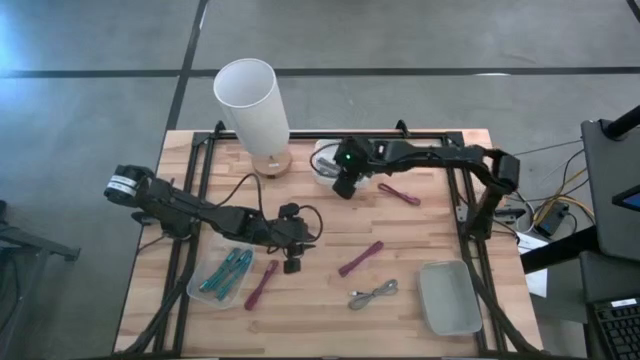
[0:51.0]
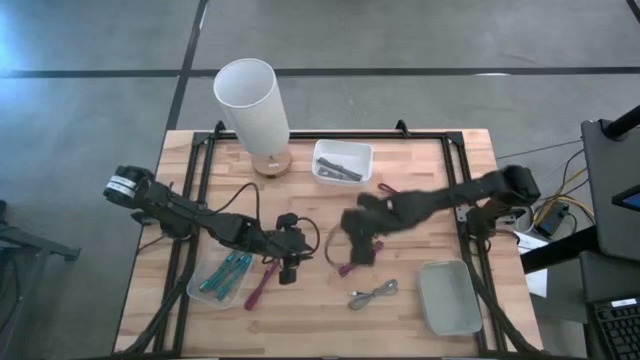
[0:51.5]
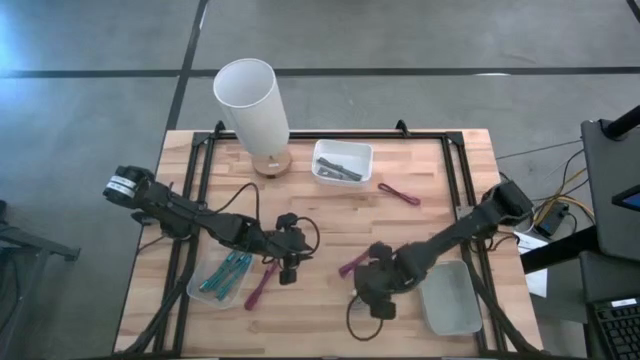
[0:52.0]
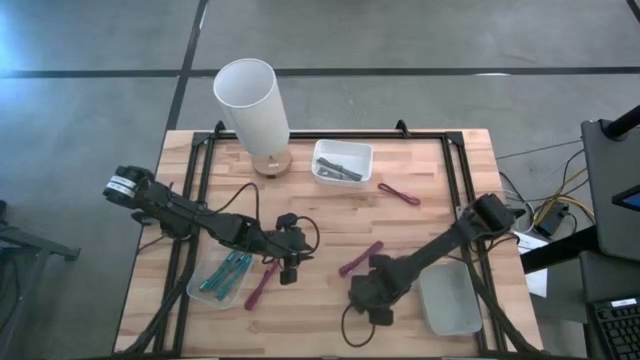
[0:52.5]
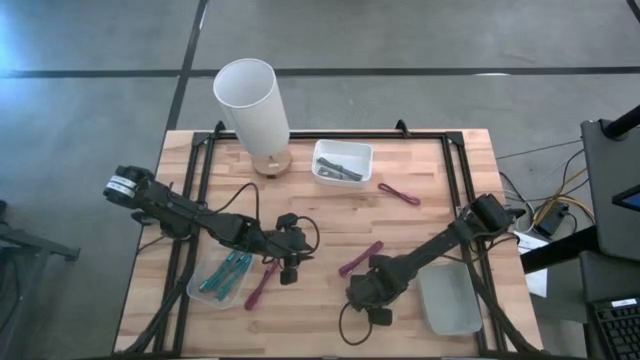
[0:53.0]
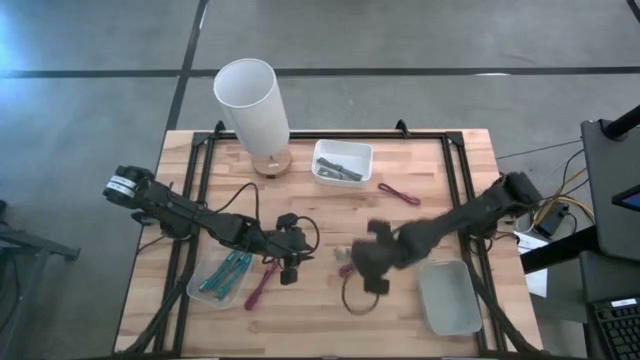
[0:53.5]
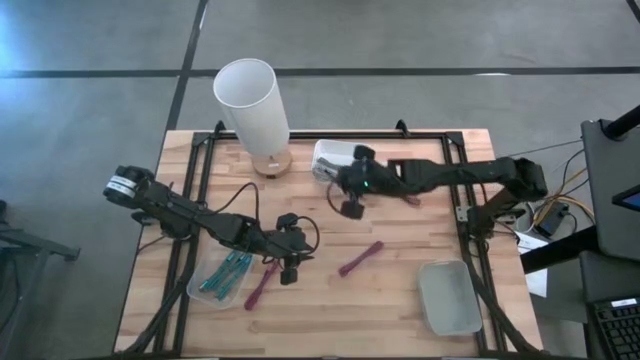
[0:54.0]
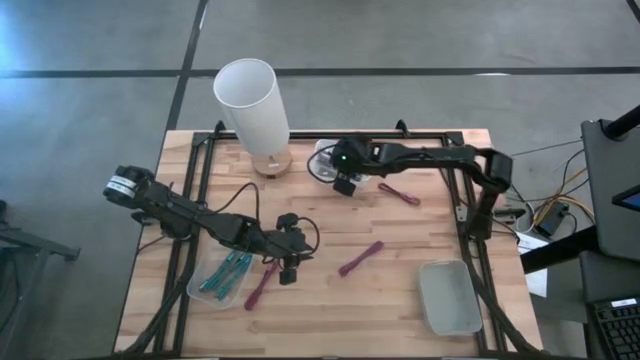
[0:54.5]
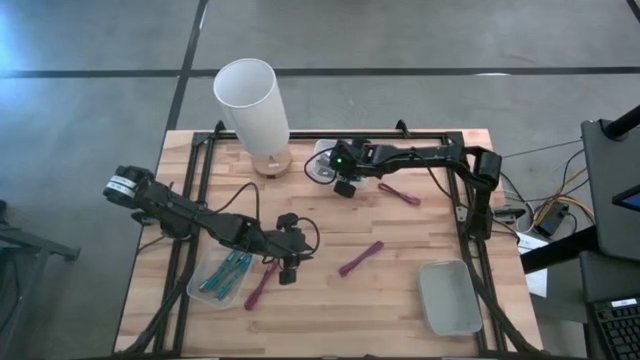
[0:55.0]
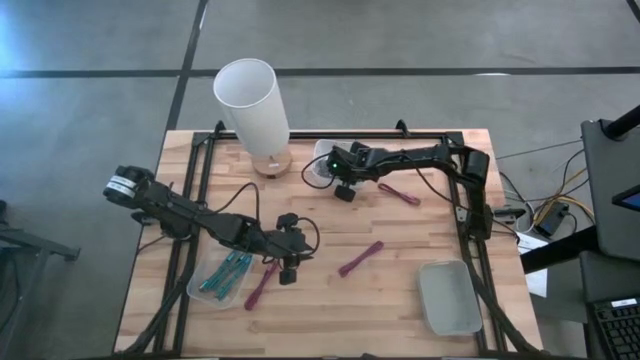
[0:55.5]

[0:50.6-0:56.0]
Task: Pick & Place USB Port
Put the white black charger cable into the white bin

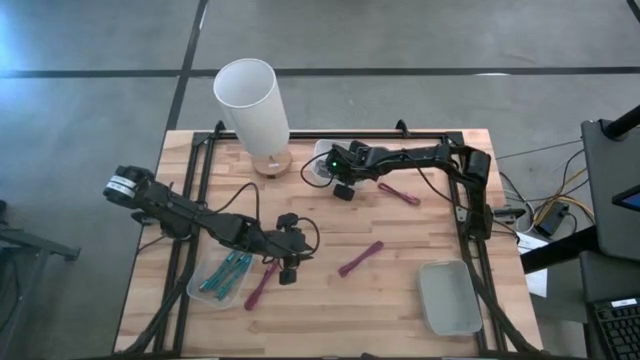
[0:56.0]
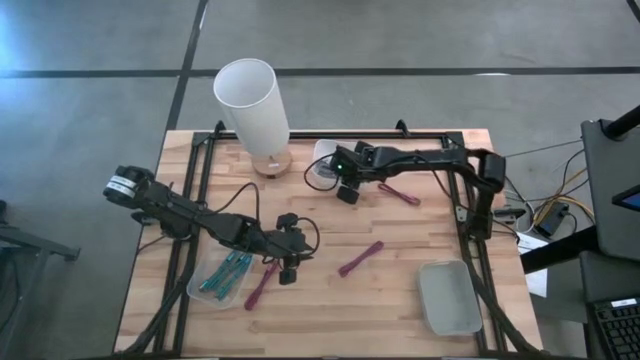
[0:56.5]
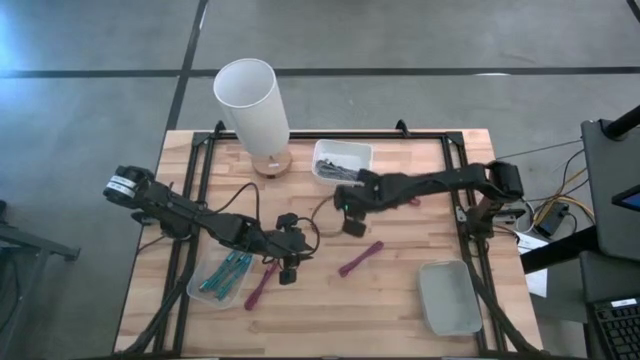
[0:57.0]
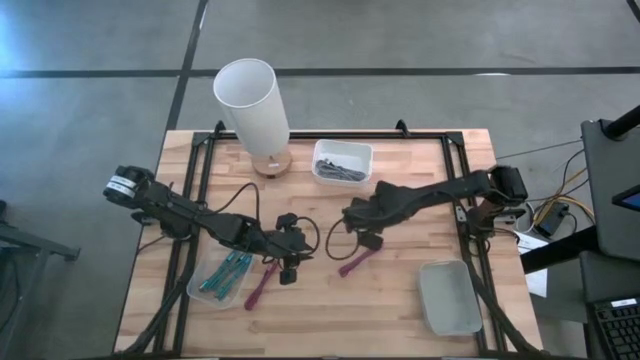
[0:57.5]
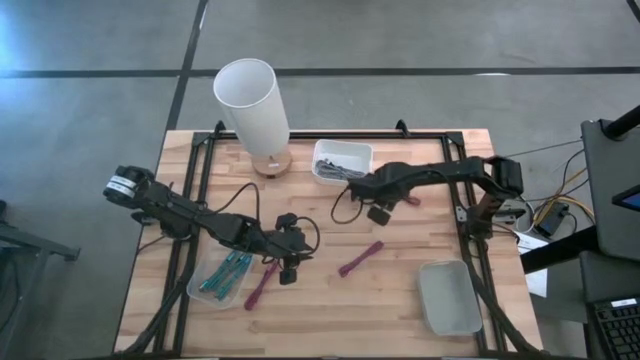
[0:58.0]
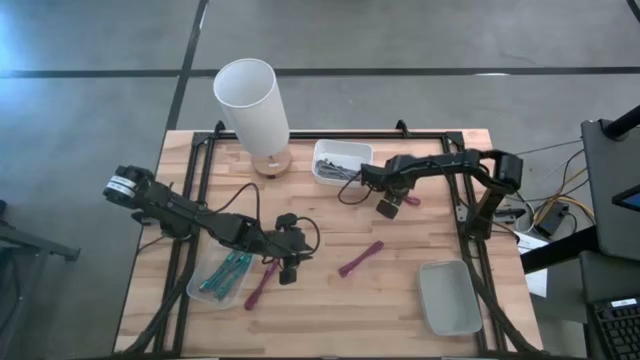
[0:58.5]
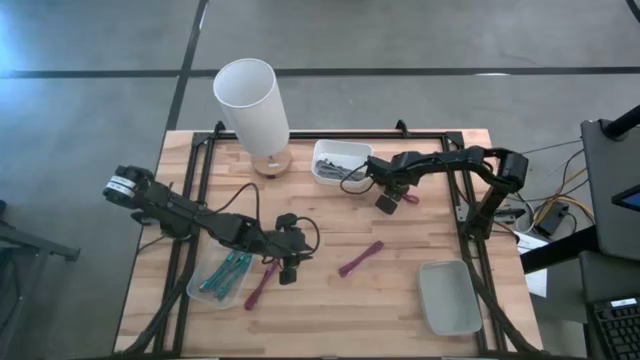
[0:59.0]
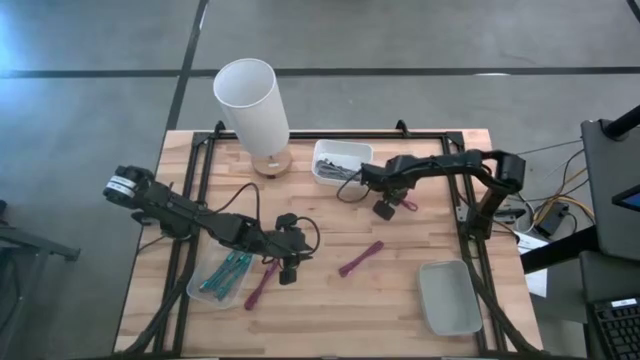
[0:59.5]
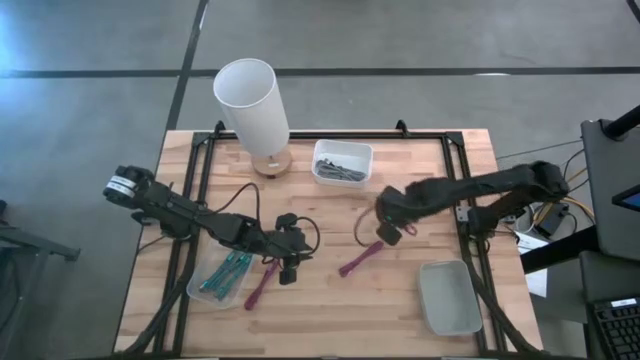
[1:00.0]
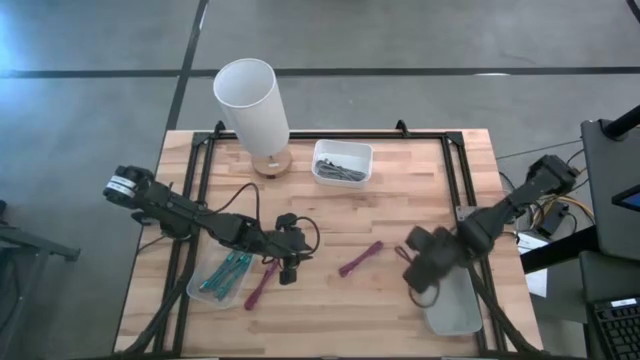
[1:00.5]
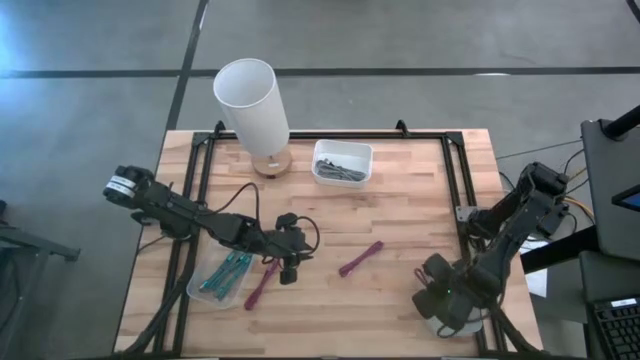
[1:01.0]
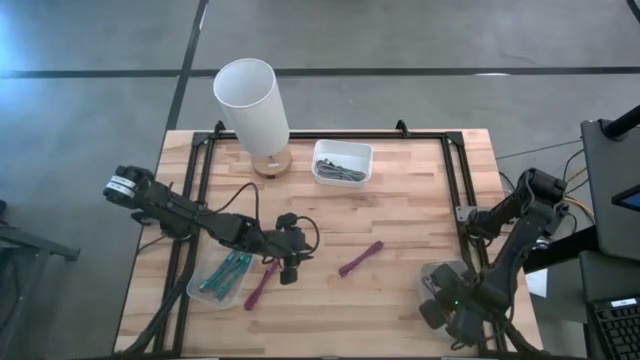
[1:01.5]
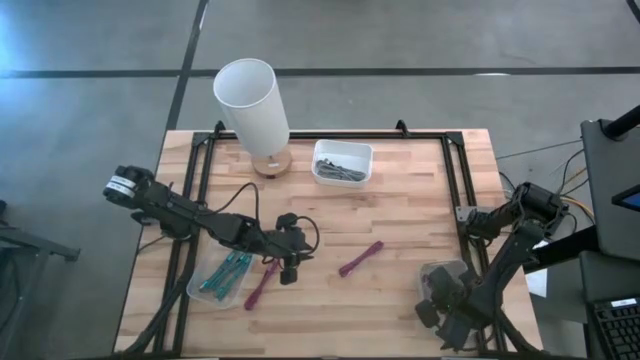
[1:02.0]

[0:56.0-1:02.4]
Put the top pink black charger cable into the grey bin

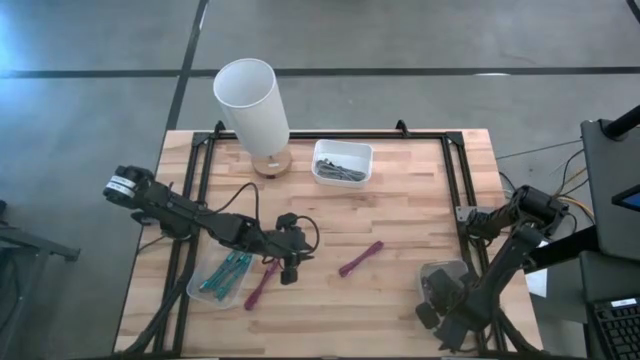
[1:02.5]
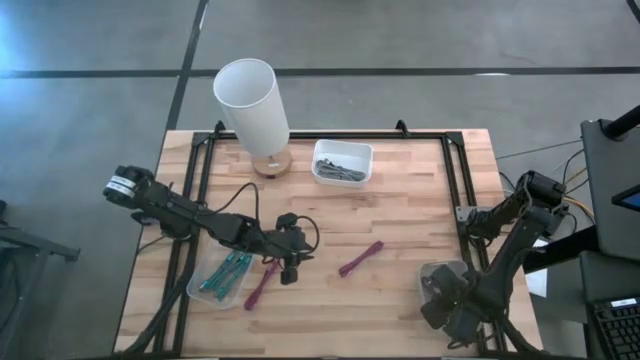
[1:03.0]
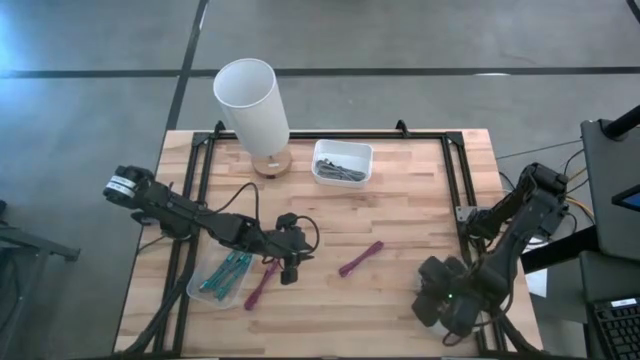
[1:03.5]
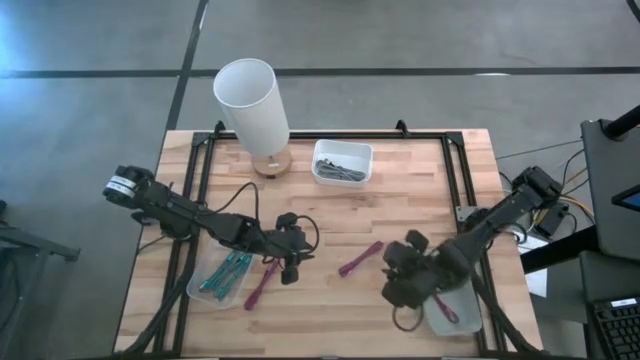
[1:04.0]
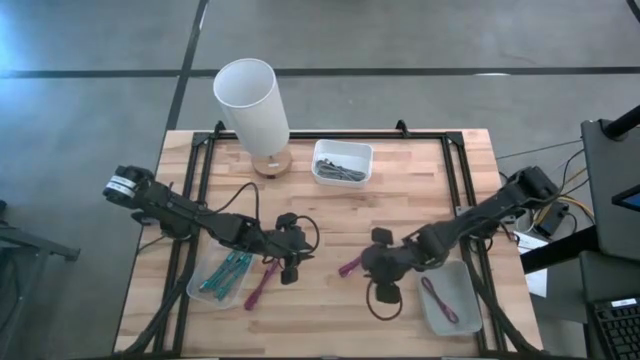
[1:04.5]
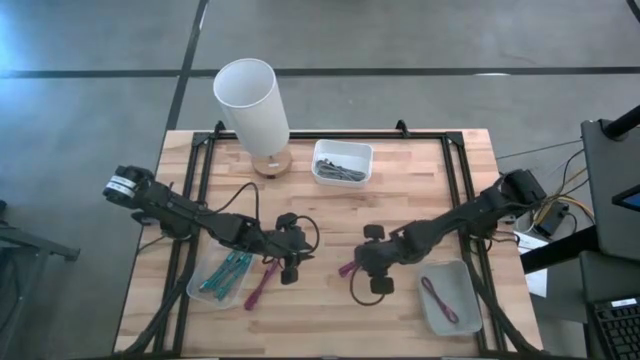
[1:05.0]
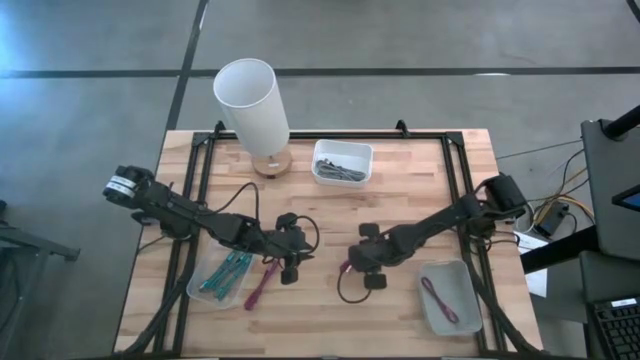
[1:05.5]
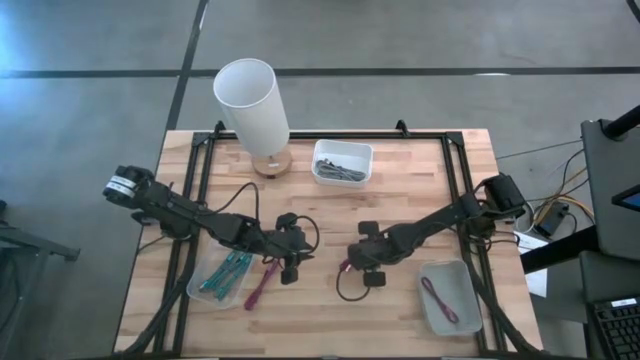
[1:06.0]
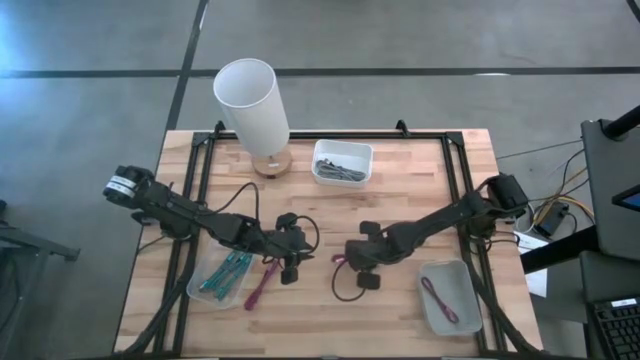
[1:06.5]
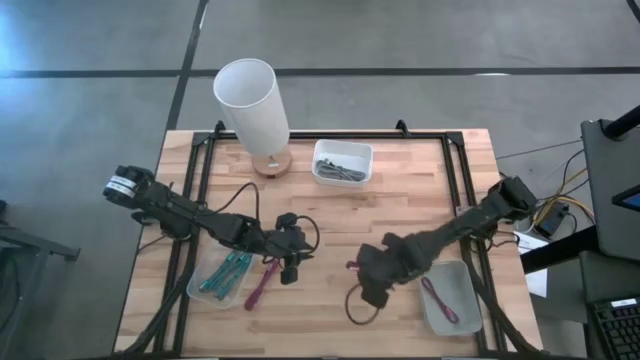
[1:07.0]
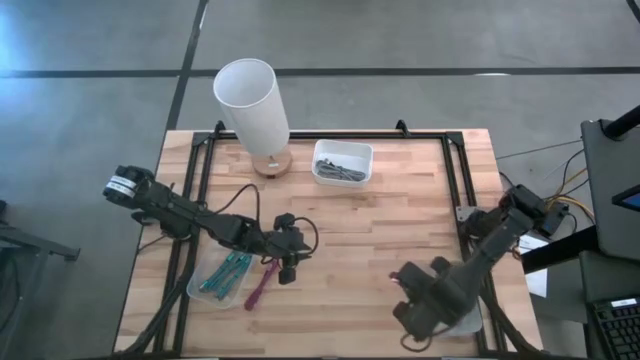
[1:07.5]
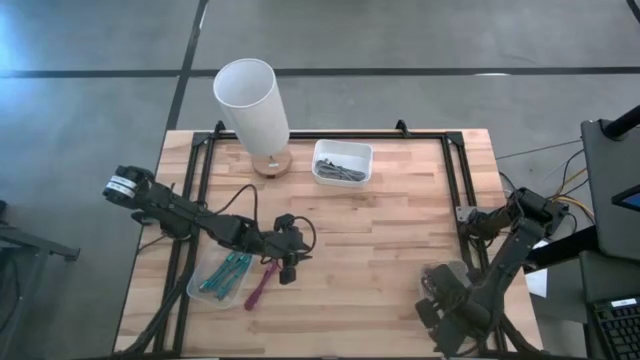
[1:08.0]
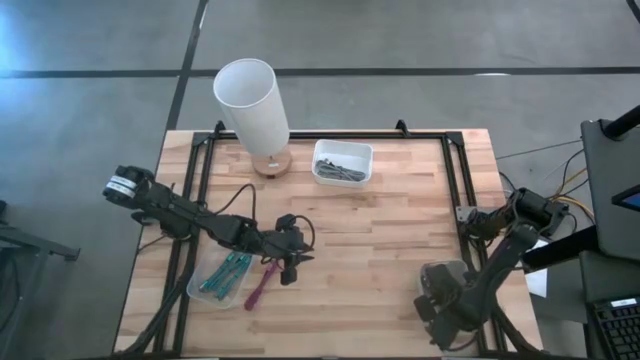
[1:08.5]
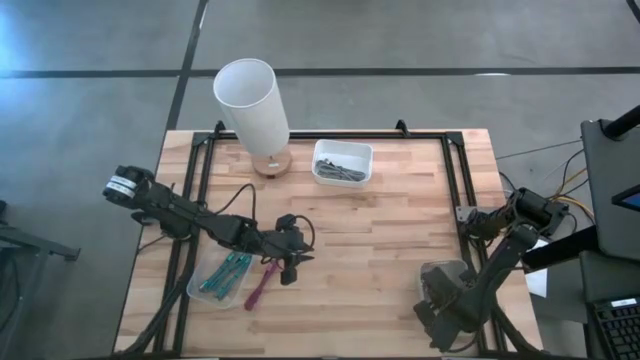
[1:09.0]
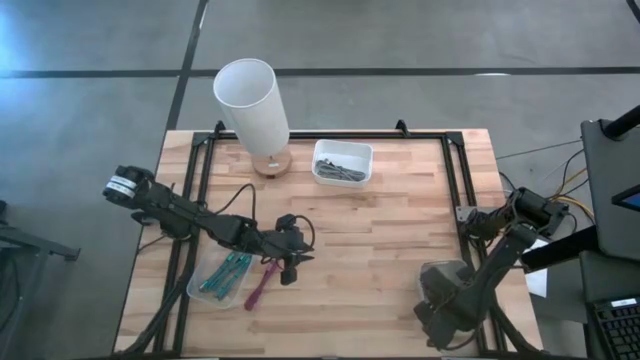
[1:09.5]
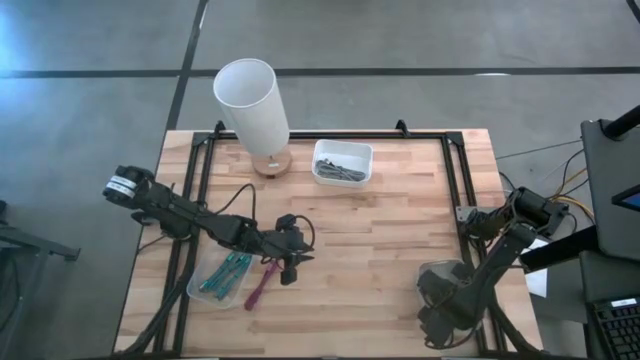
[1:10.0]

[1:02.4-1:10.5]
Put the right pink black charger cable into the grey bin

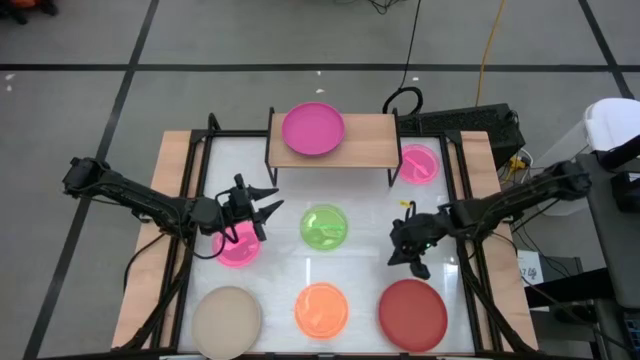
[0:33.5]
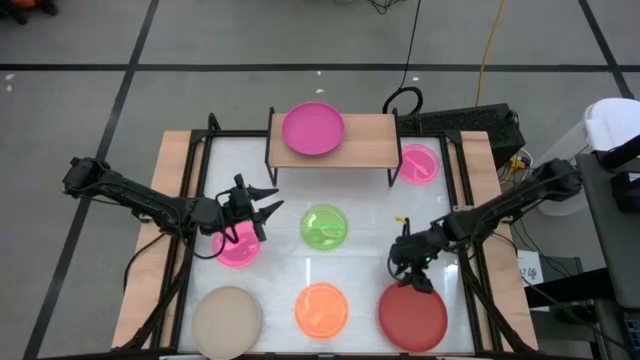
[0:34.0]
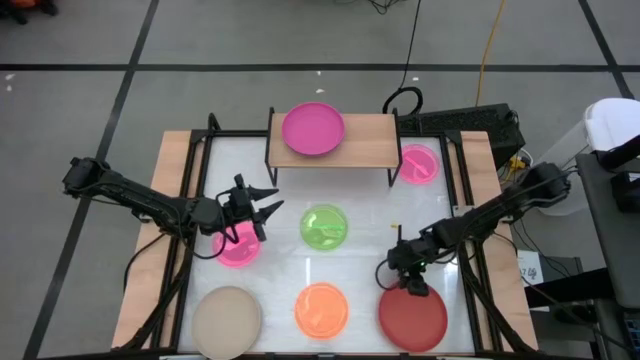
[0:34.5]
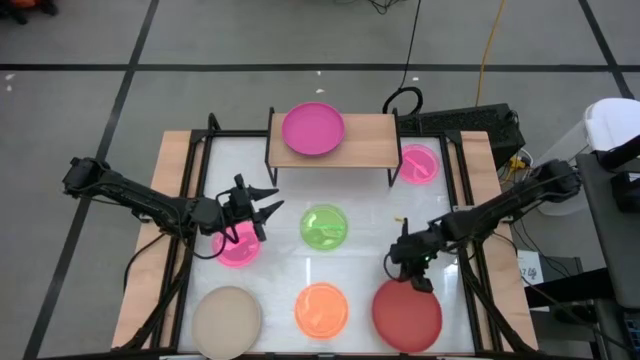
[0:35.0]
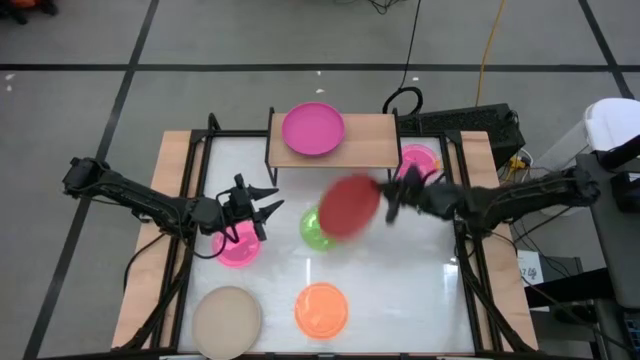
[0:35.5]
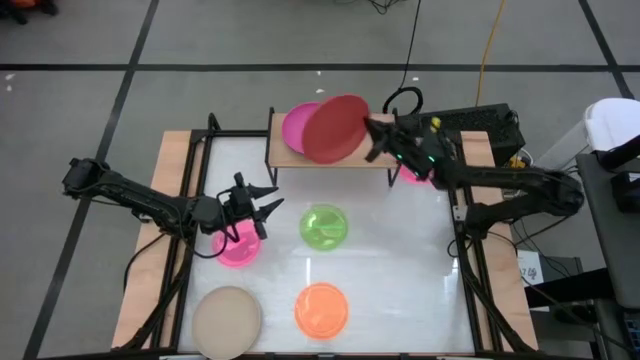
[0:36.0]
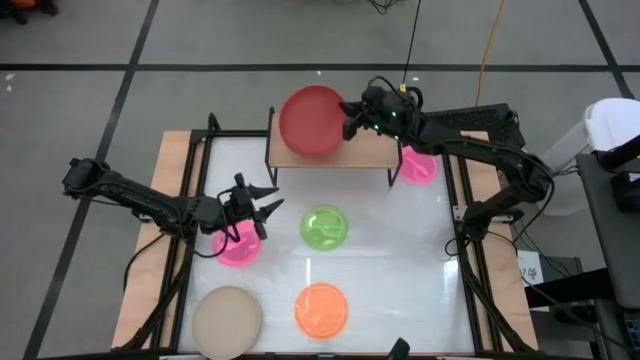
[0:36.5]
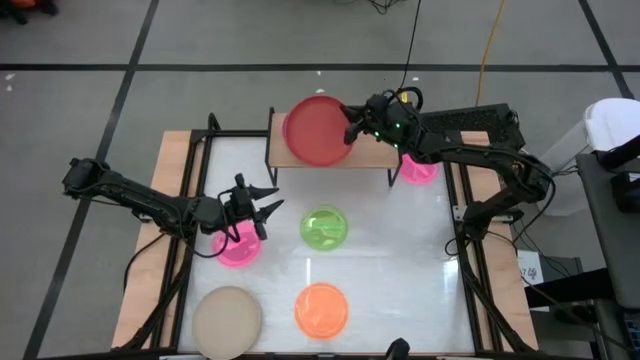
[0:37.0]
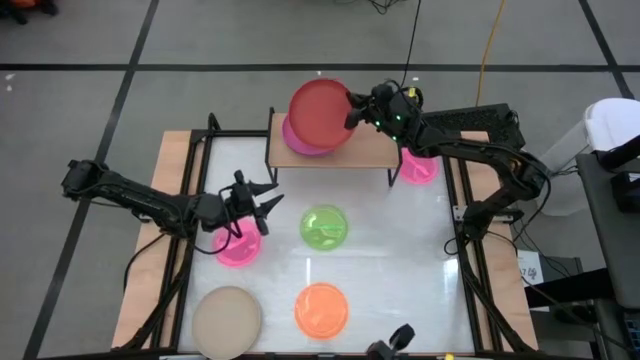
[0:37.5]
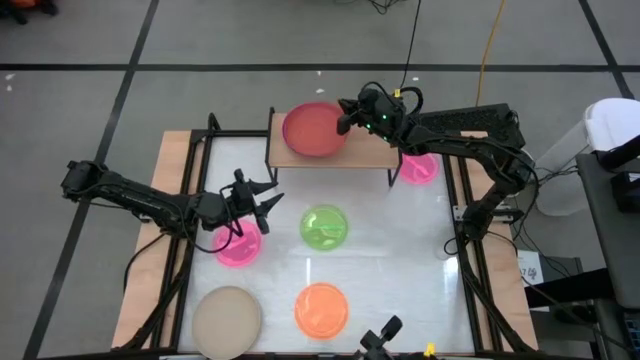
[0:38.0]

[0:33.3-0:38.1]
Task: Place and stack plates onto a shelf
Stack the orange plate on top of the pink plate on the shelf
